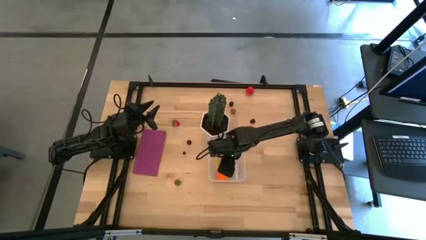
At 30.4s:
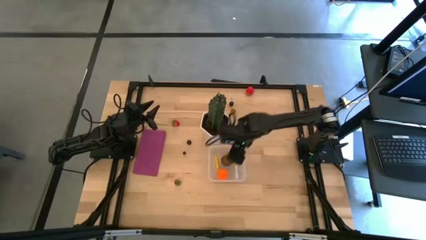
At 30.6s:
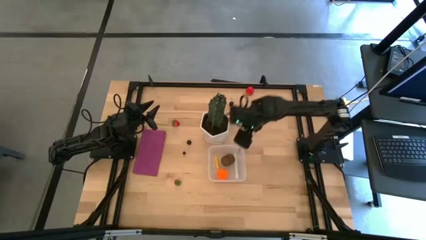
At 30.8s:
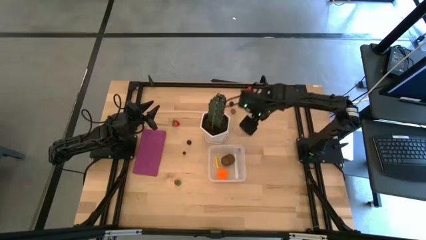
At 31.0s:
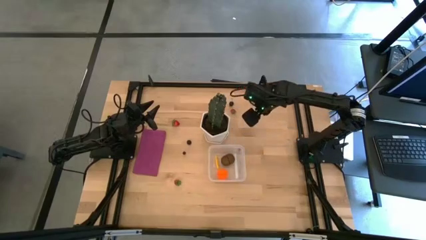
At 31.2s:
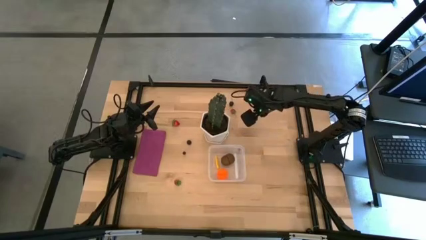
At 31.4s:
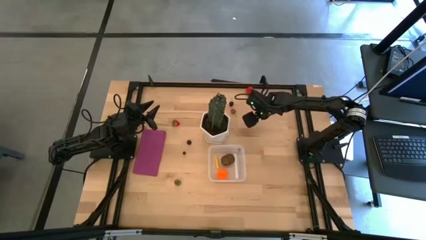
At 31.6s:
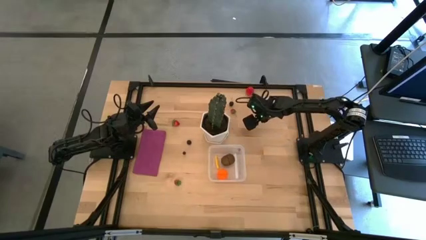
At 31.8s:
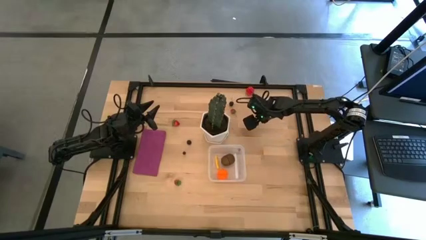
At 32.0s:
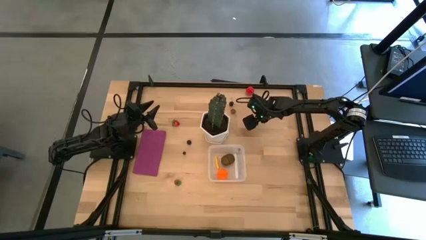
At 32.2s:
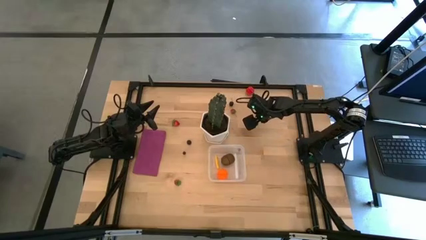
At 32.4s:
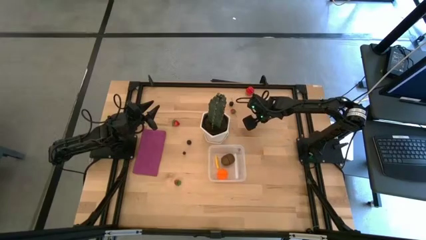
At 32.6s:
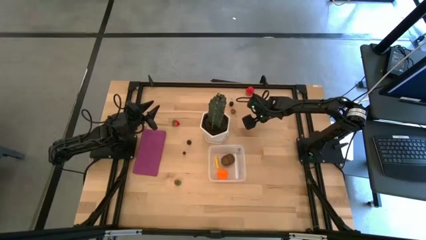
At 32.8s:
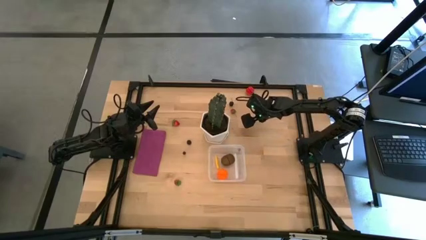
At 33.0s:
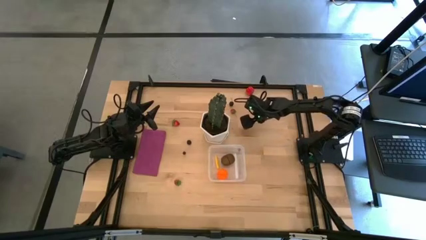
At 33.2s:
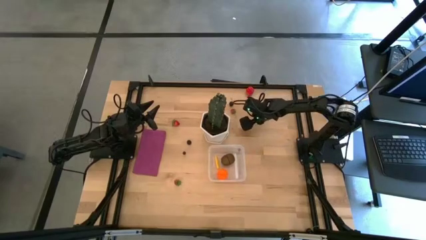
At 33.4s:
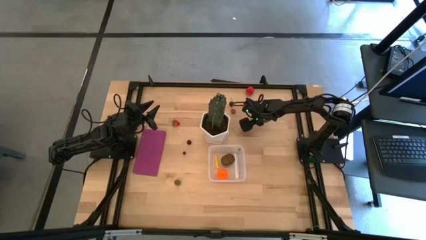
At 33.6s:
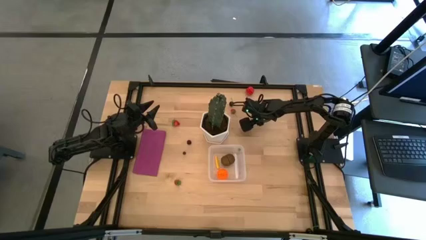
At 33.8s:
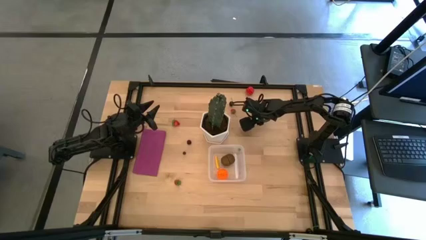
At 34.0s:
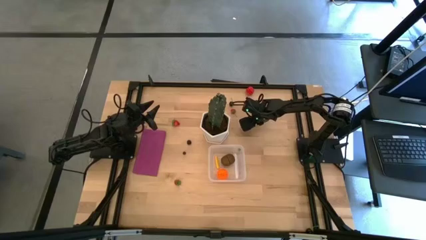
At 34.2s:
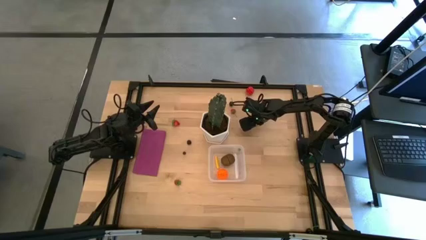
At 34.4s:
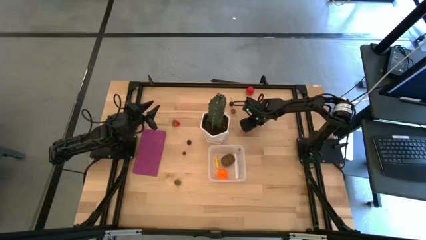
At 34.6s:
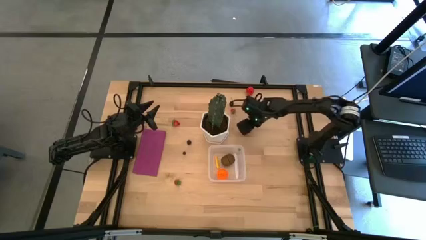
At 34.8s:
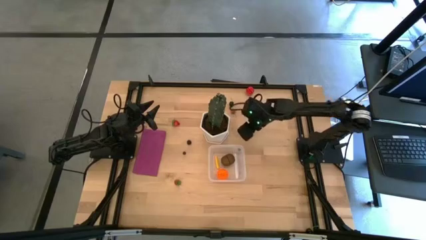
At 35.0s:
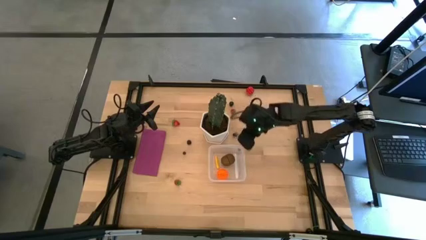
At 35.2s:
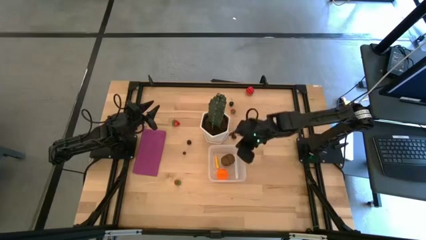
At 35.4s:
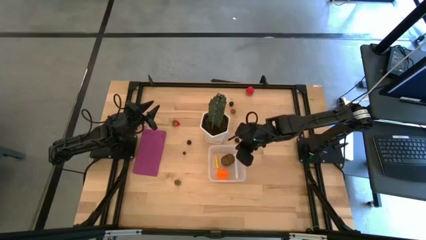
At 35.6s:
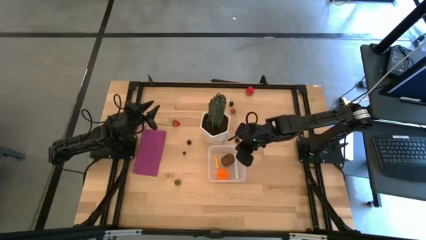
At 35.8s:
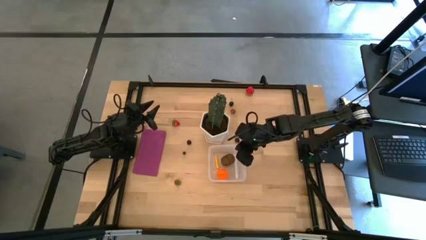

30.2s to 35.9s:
Task: Pick and placing Produce into tupperware
Put the blackberry into the transparent bin

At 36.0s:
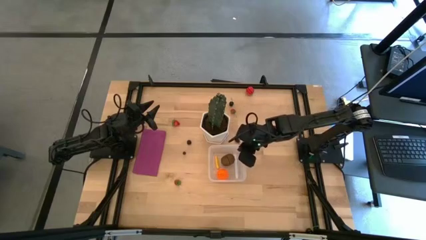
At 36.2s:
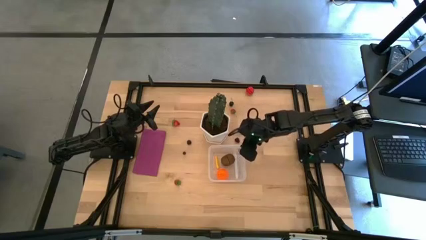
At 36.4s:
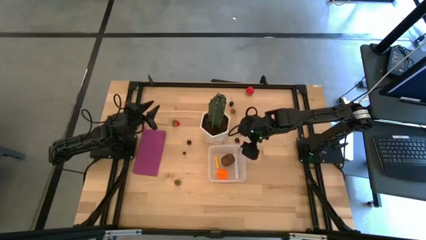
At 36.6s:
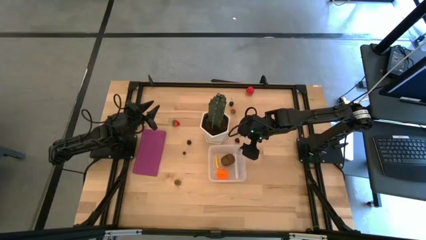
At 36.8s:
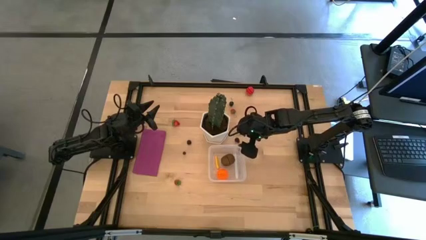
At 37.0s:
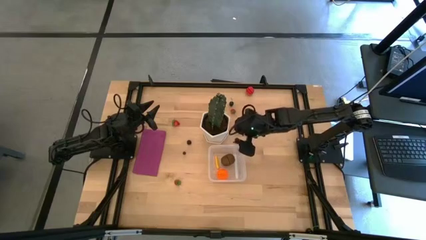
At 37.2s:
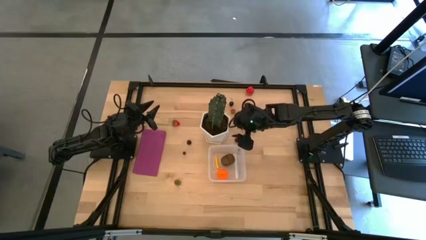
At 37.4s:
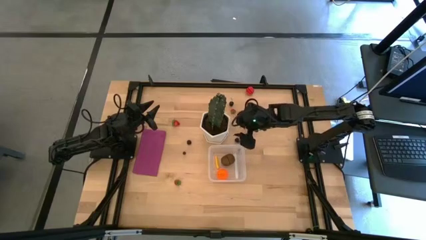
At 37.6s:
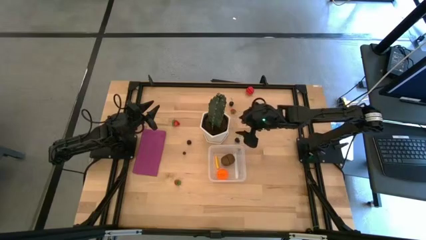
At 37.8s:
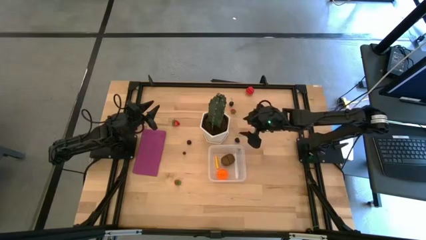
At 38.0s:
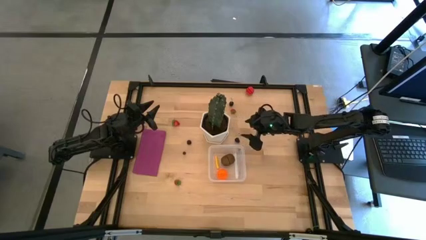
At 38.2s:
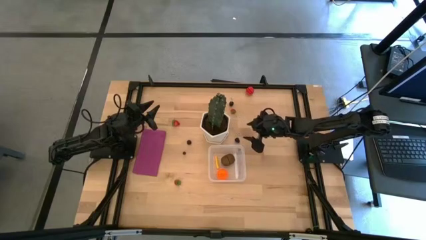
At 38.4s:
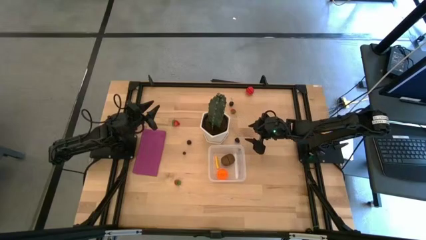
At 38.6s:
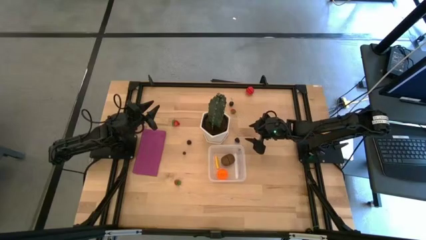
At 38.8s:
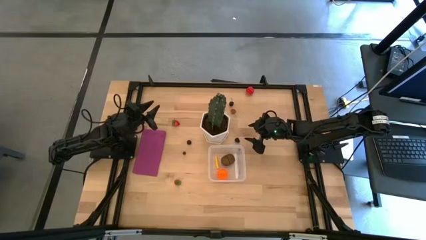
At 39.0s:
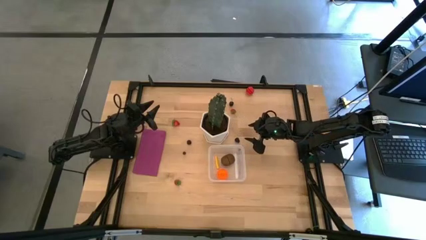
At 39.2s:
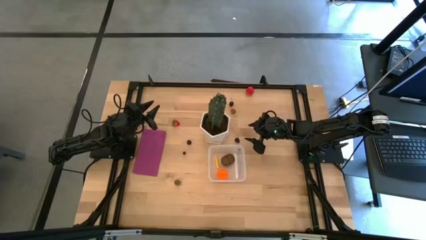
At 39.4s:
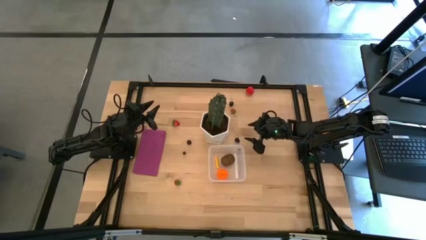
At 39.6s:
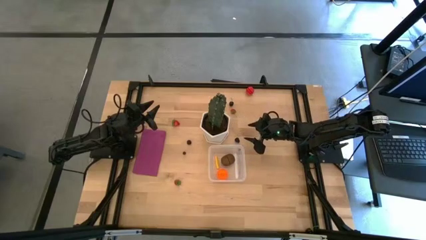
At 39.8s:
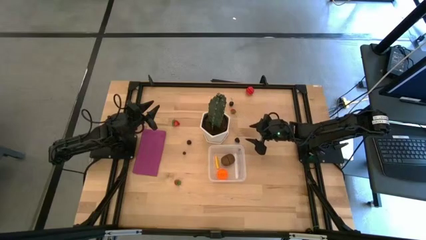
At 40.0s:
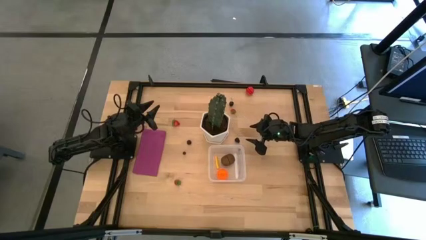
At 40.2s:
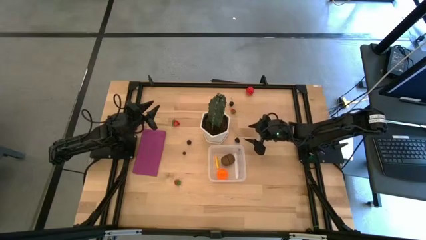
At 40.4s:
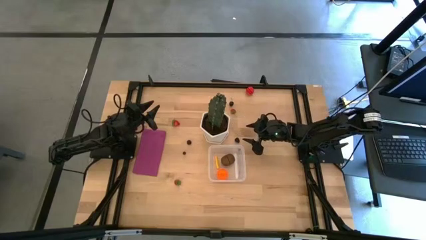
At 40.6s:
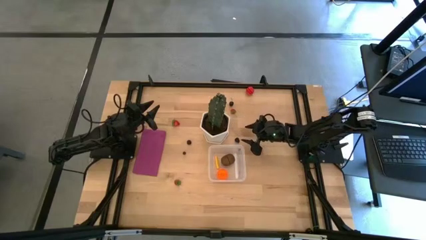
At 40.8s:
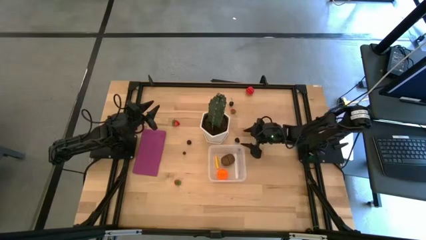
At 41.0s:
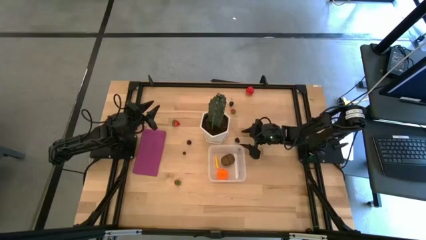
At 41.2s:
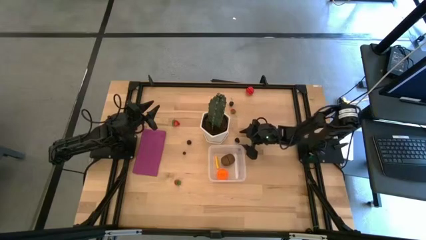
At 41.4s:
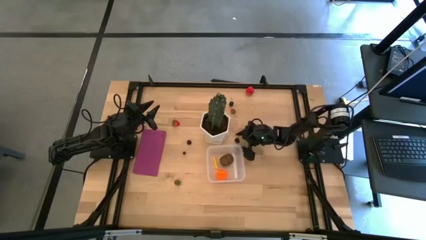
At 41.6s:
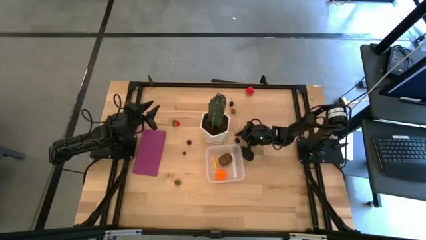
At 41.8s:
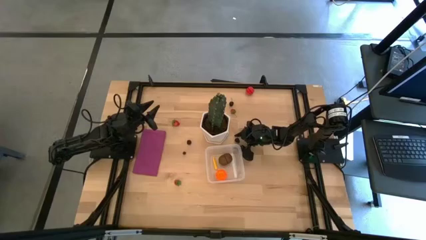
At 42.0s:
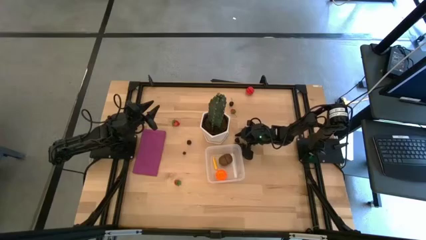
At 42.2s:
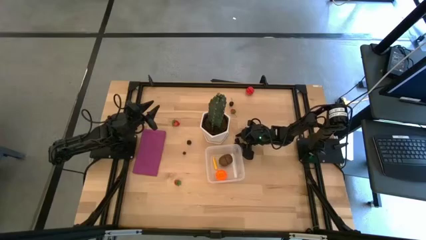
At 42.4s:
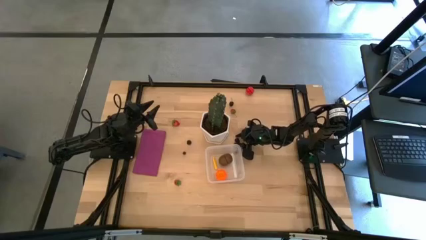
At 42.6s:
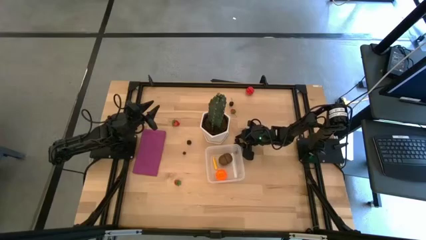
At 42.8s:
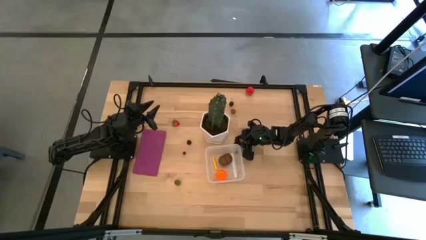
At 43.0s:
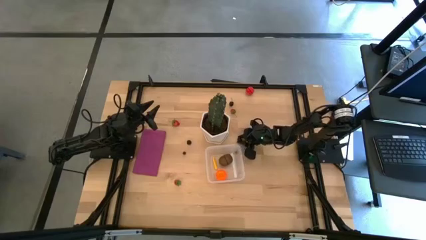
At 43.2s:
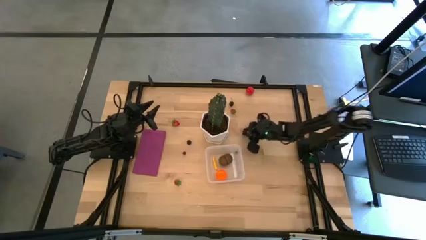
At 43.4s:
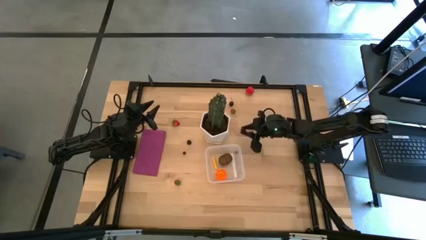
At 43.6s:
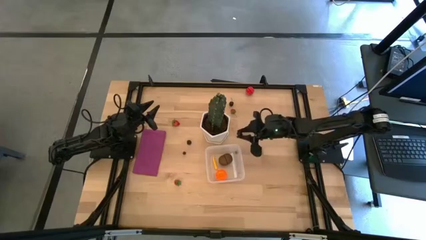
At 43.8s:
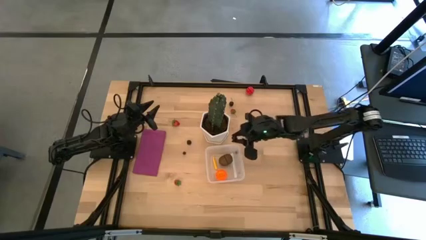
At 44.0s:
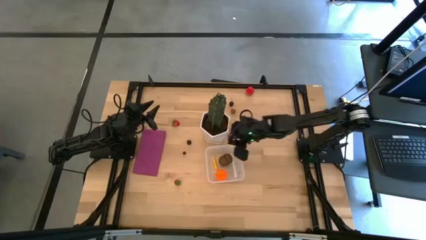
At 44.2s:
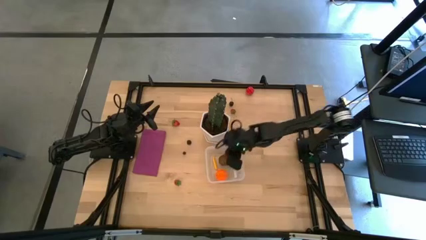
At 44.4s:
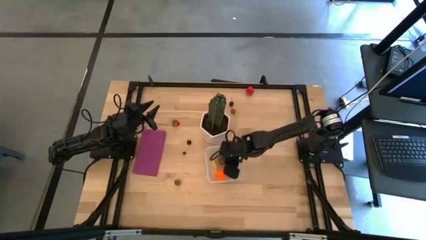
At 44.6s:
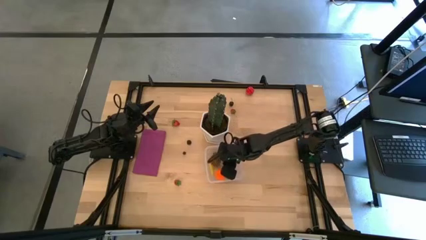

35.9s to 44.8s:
Put the blackberry into the transparent bin

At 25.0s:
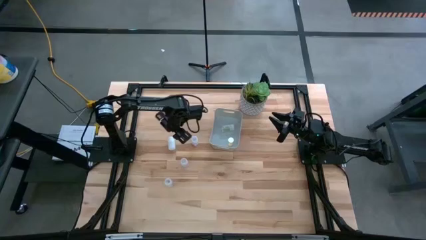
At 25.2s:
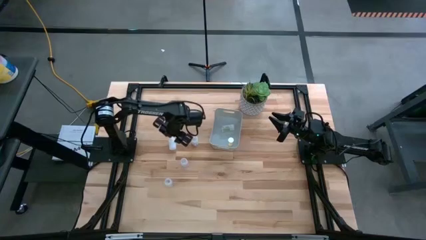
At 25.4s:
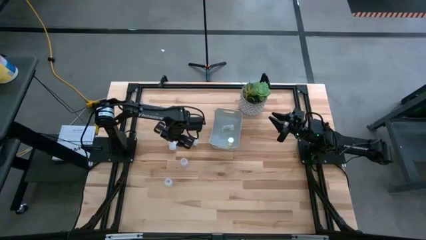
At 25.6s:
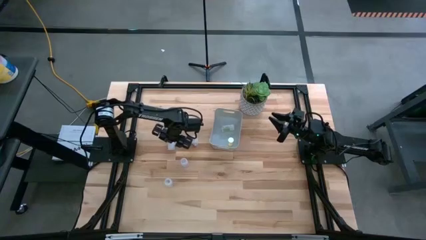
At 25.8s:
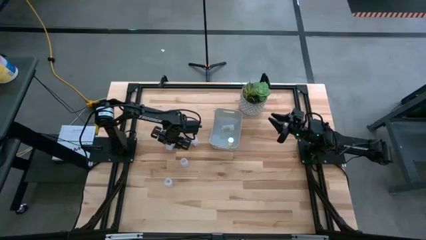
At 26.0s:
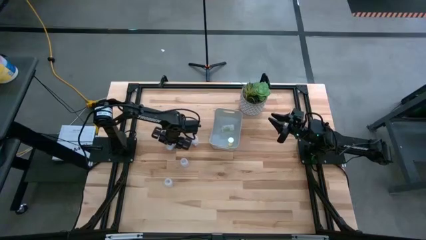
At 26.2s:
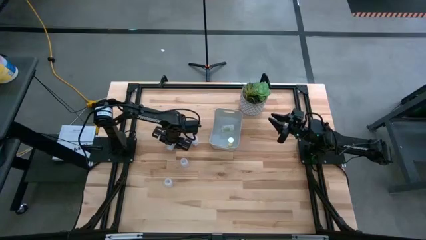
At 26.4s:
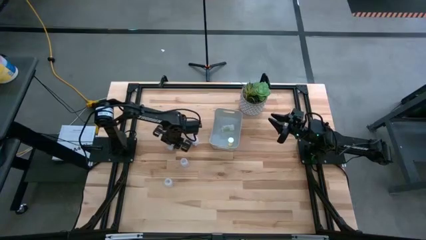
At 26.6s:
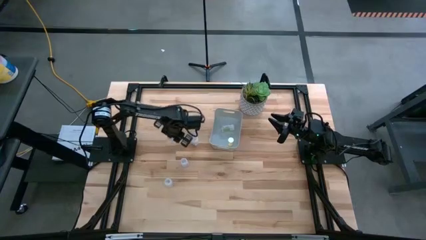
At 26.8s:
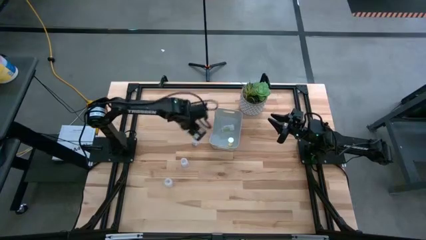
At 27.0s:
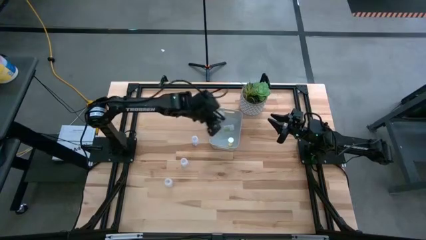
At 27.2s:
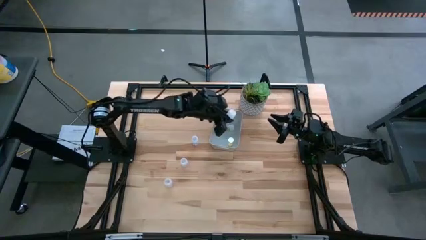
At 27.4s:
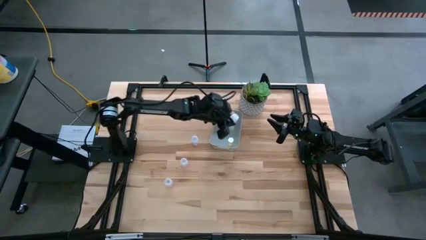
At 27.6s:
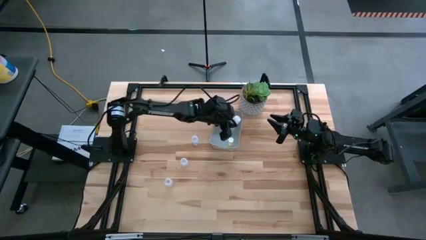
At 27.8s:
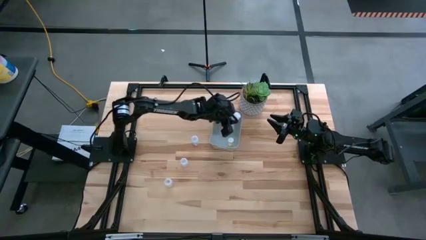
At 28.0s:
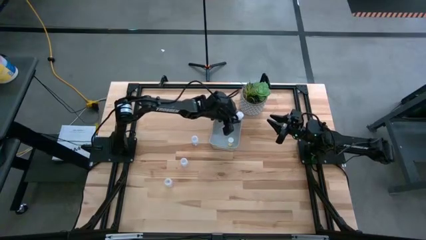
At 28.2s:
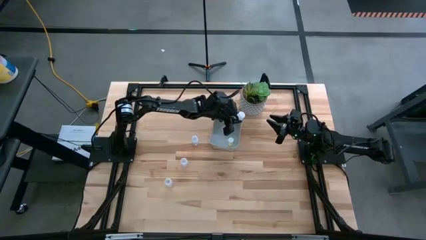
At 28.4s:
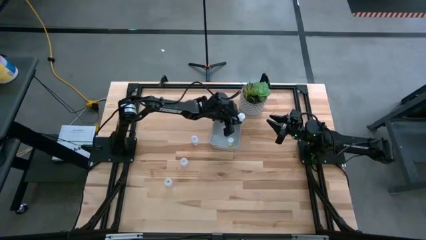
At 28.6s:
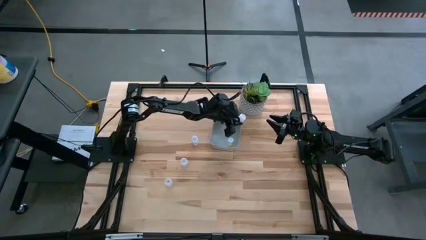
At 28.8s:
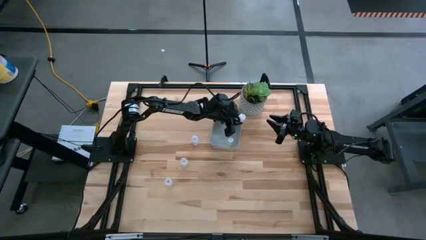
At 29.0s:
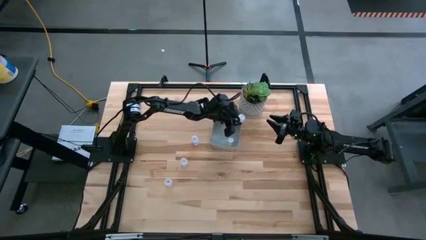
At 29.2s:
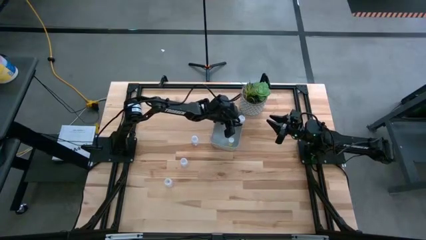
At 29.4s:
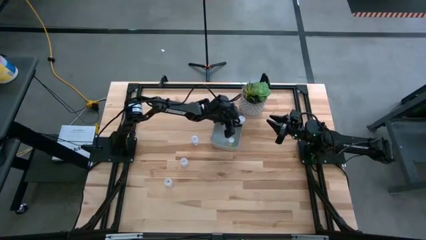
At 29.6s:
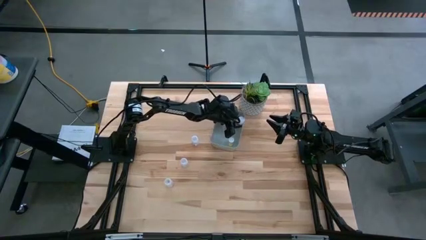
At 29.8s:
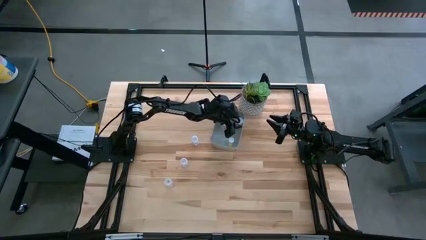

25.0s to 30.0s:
Task: Pick and place pill bottles into a basket
Put the transparent pill bottle into the white bin
